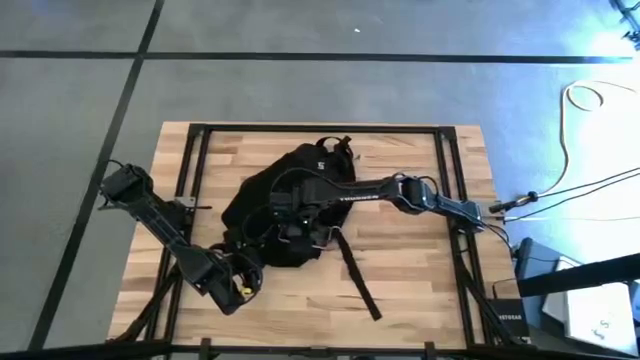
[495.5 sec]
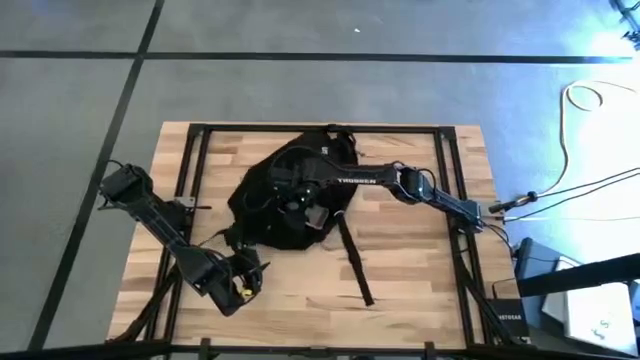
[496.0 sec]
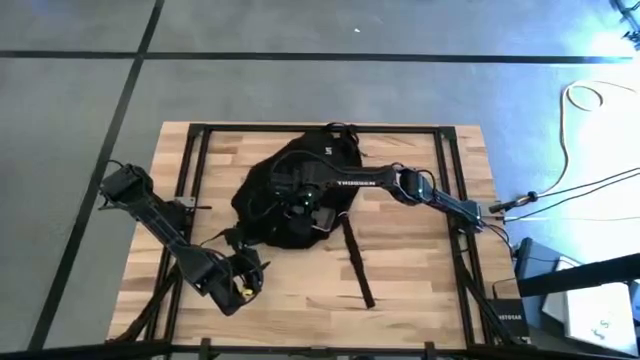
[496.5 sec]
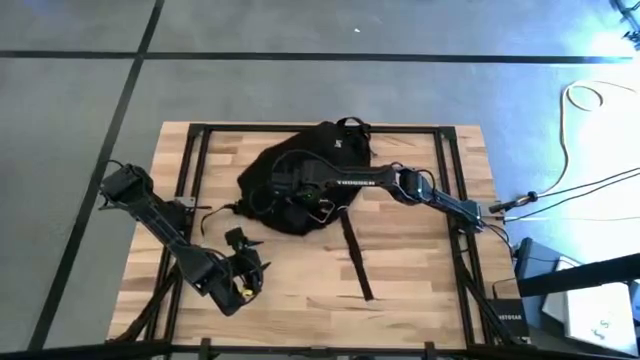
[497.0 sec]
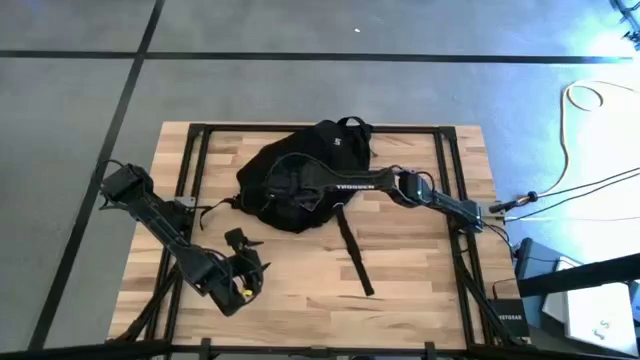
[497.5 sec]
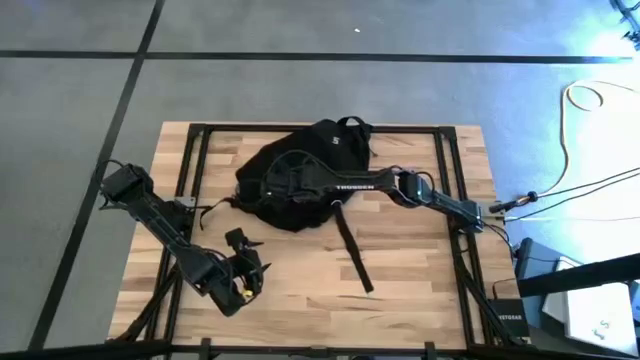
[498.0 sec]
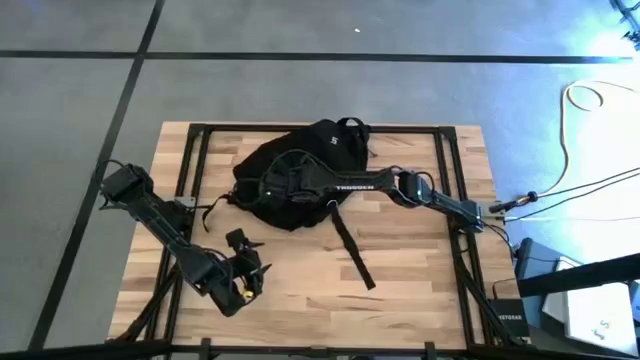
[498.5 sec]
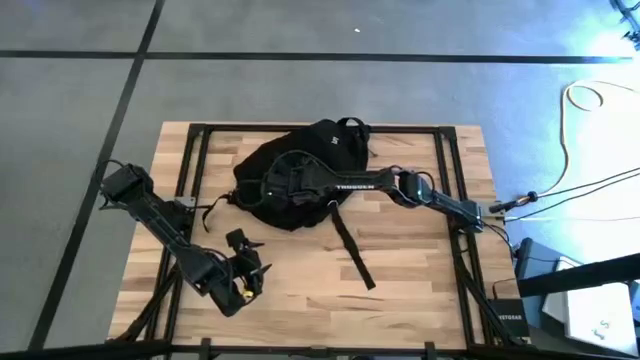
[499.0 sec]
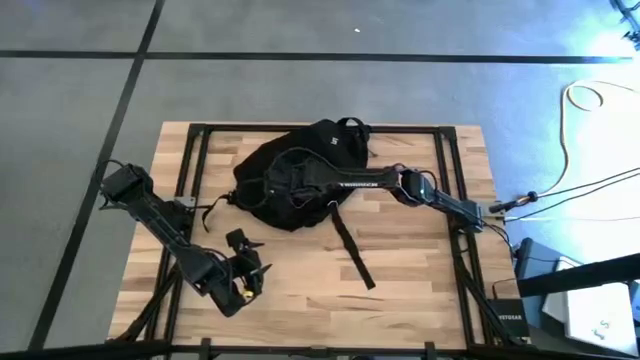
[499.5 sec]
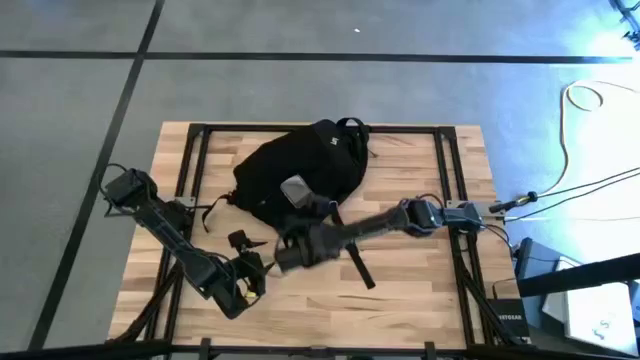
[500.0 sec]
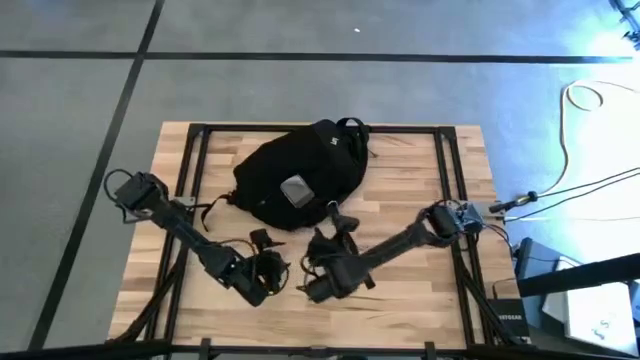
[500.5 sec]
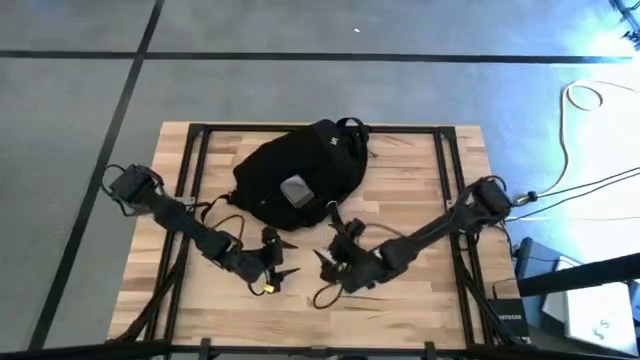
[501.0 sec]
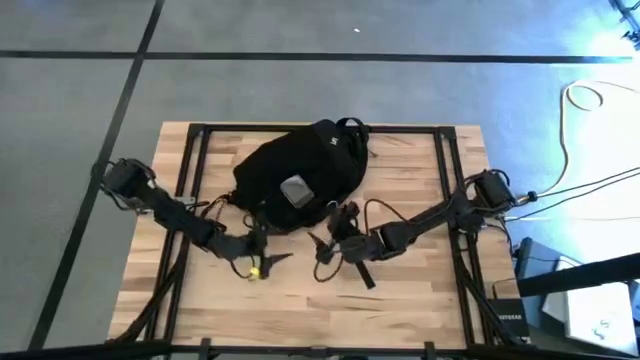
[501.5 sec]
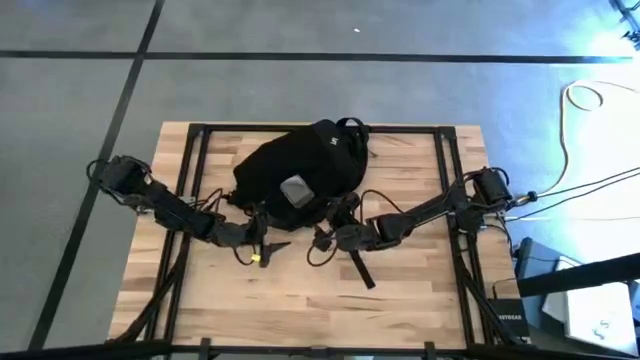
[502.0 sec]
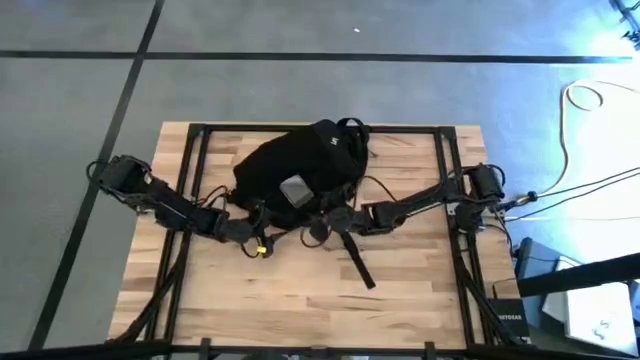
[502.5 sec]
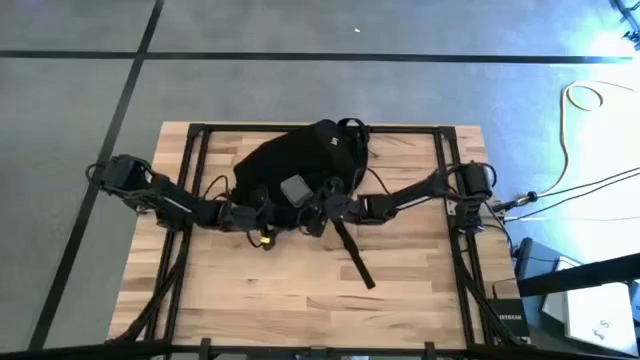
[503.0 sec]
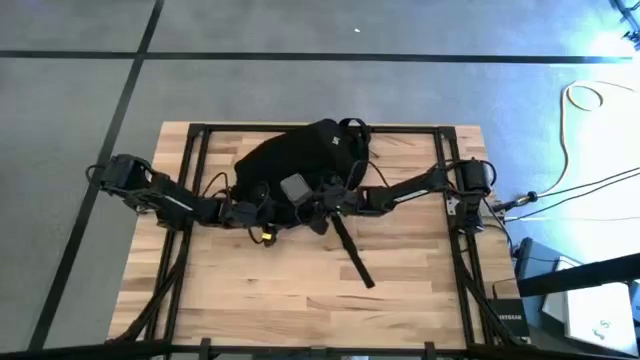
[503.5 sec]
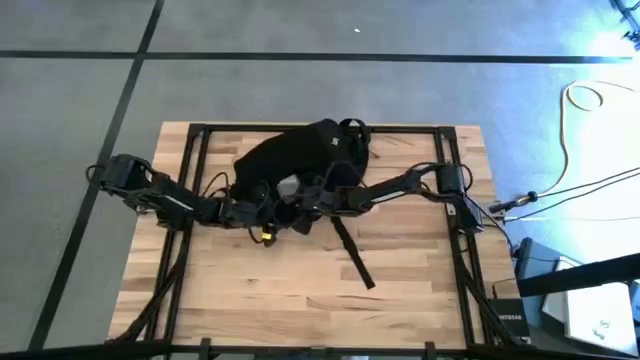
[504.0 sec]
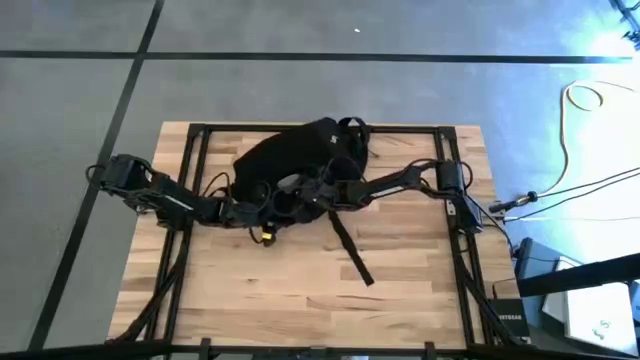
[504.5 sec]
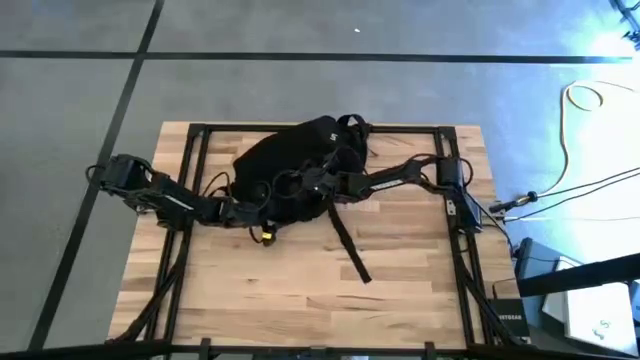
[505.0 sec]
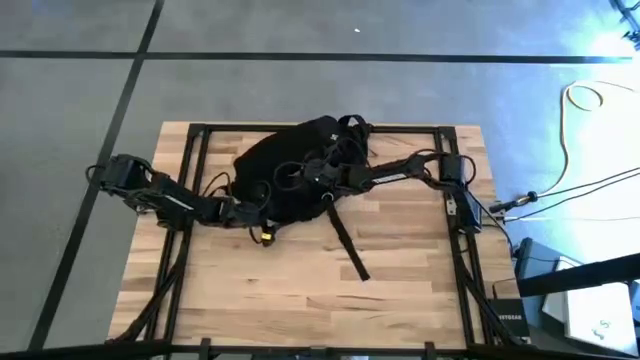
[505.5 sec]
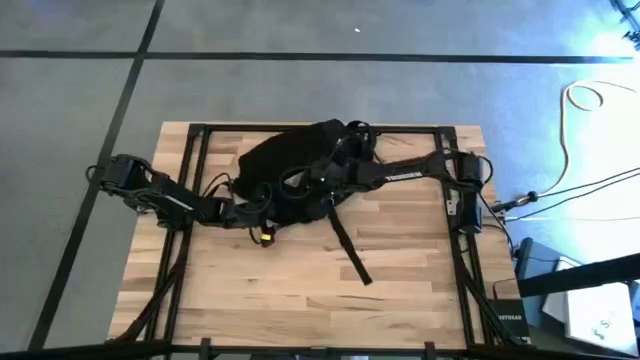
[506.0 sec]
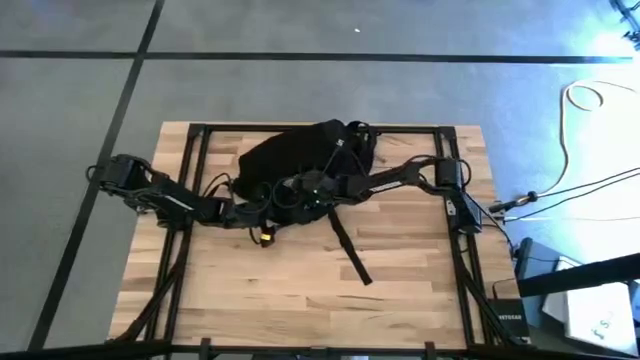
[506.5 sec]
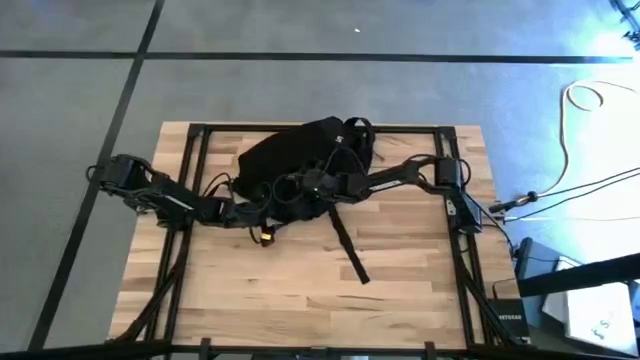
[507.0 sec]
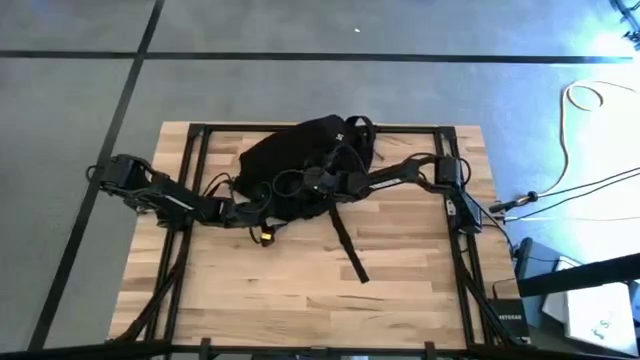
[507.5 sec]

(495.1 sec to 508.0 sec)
Task: Unpack backpack
Put the pink cellphone into the black bag

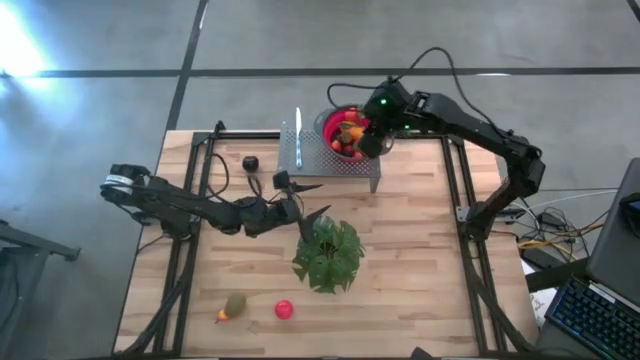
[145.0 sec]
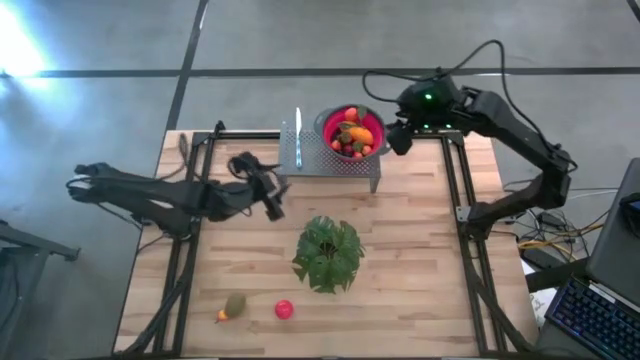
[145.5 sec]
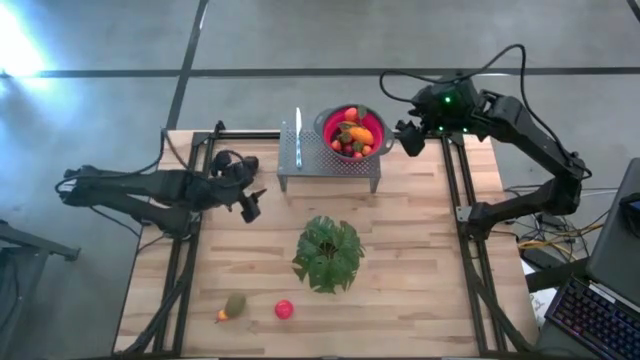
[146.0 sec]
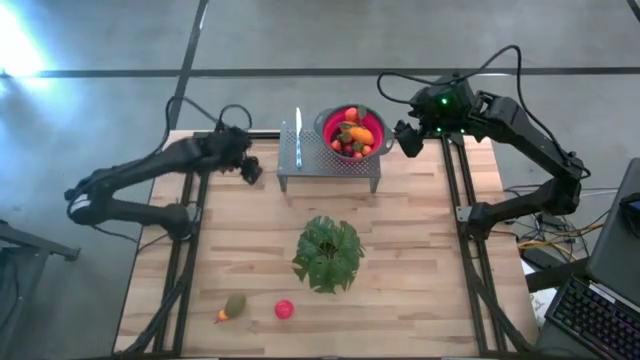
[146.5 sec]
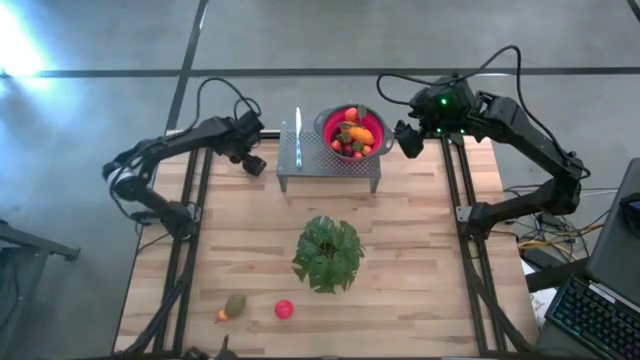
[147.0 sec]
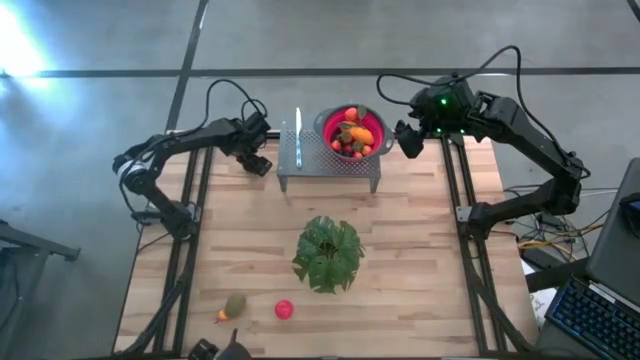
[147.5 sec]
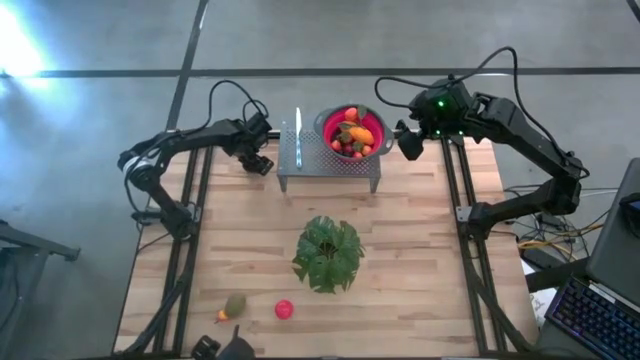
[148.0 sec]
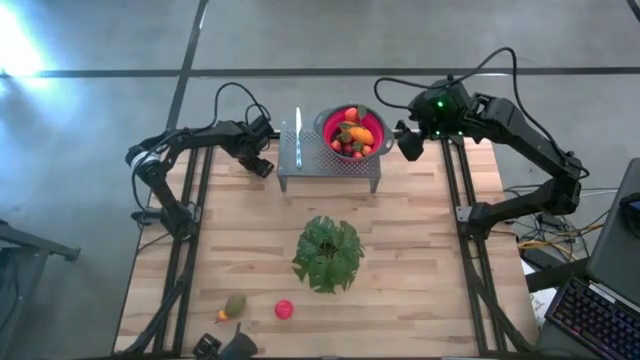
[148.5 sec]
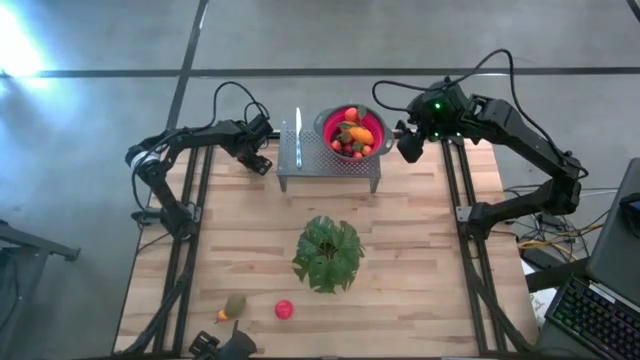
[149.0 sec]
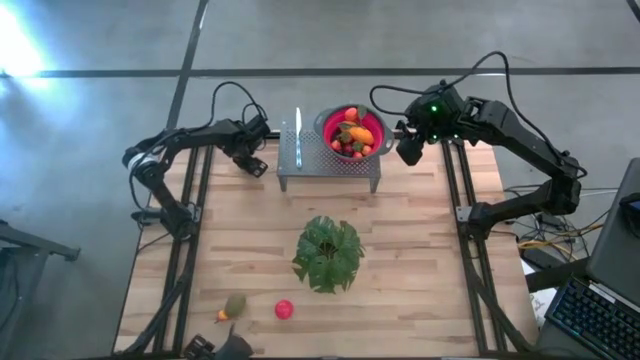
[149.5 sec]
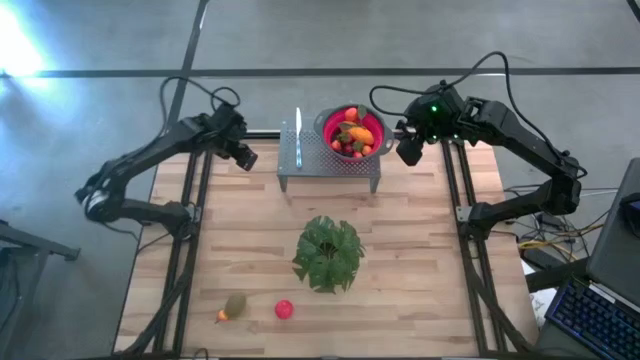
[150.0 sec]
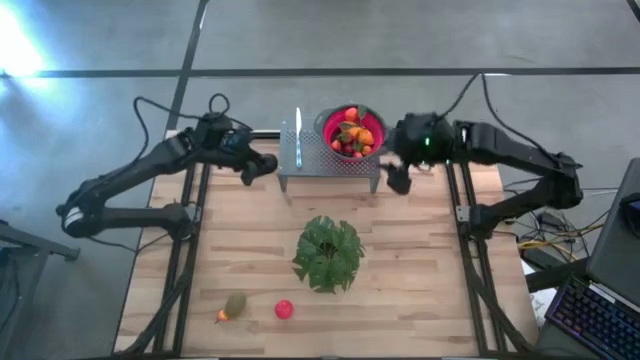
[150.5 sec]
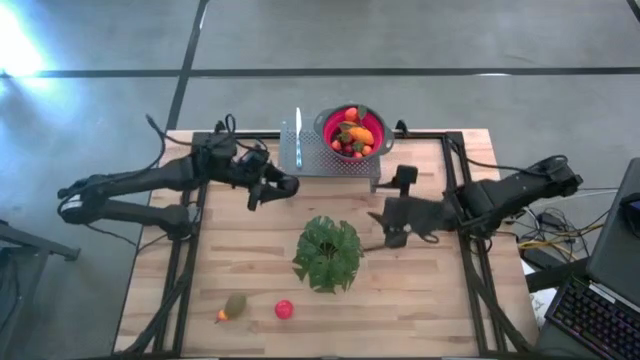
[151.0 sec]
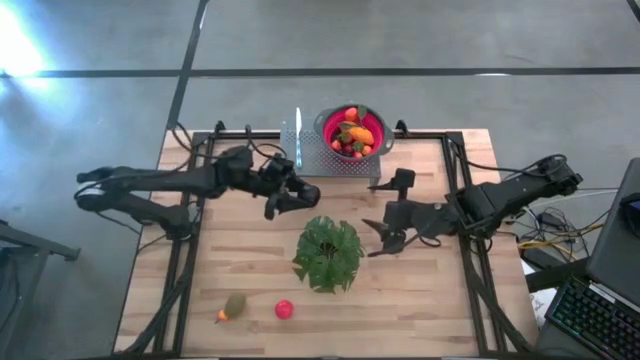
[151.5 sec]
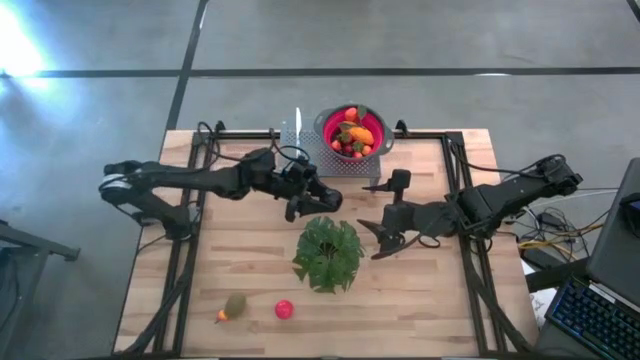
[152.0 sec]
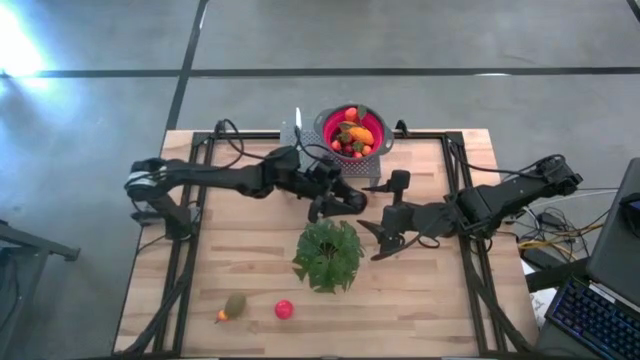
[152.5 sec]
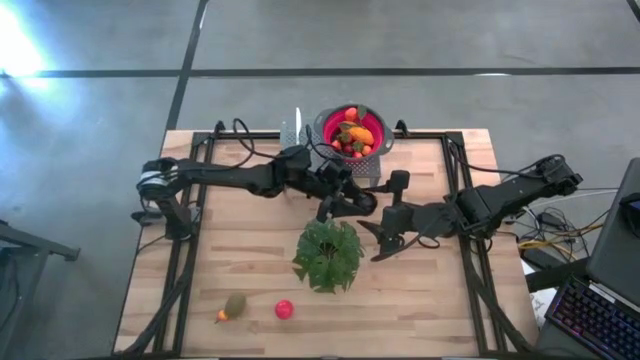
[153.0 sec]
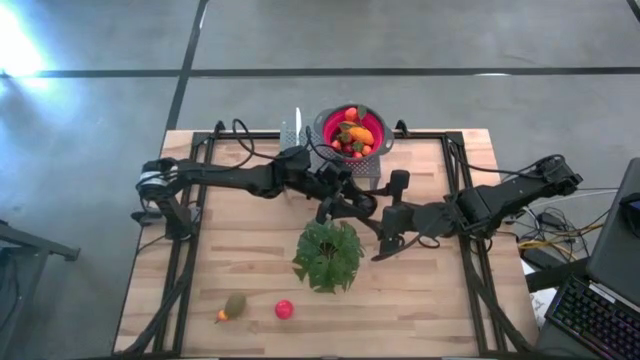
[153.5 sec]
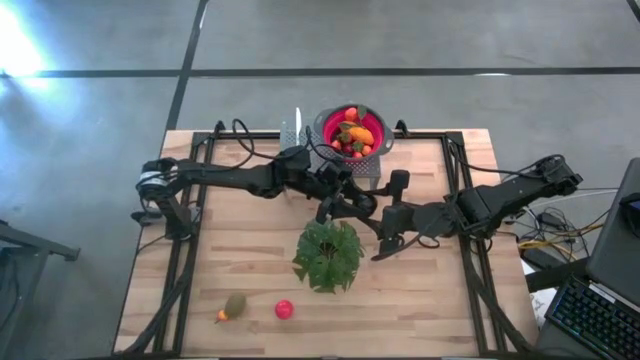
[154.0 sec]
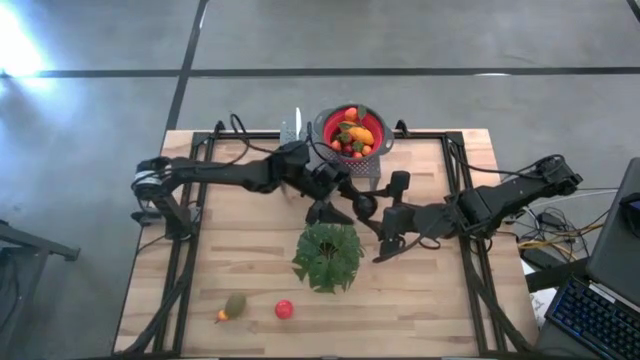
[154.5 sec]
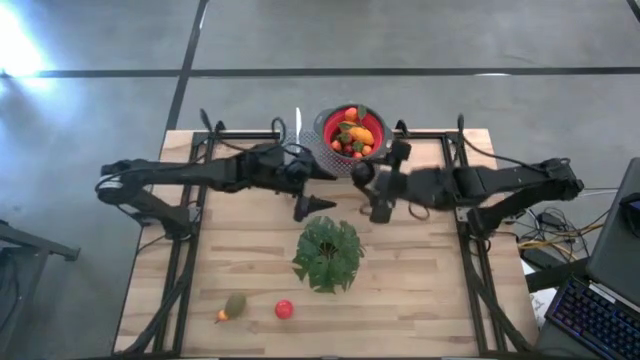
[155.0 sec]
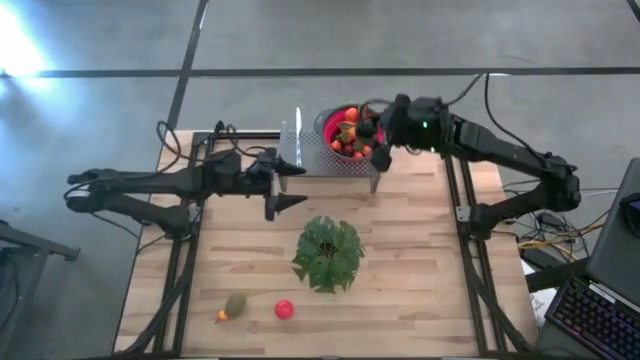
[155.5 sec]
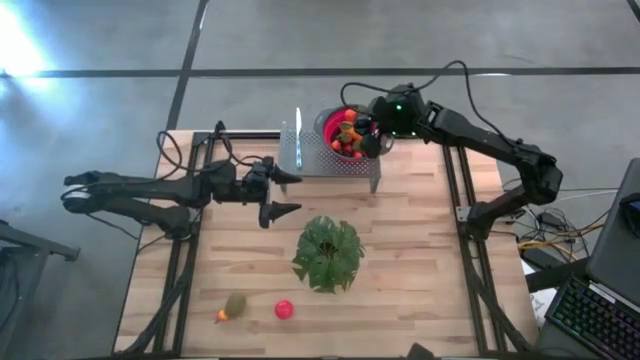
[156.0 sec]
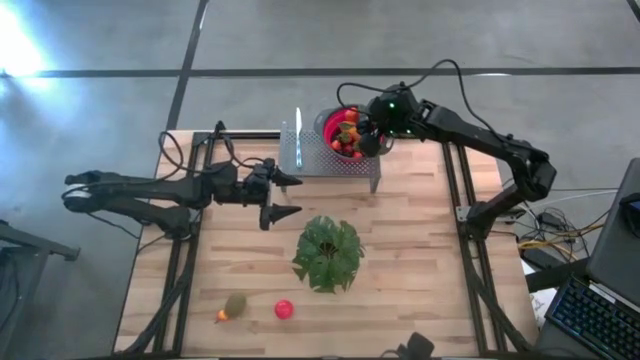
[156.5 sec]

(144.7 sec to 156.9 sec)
Task: Pick & Place Fruit
Put the plum into the red strainer bowl on the shelf
